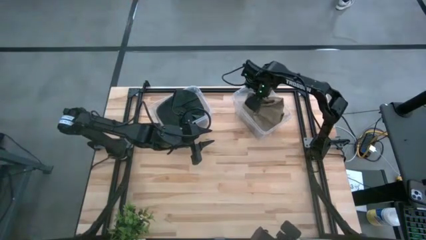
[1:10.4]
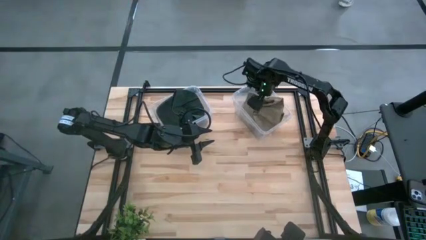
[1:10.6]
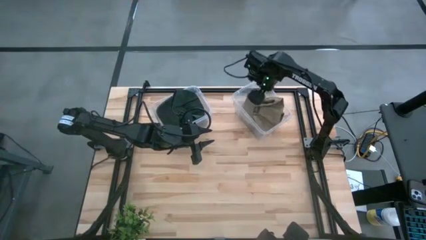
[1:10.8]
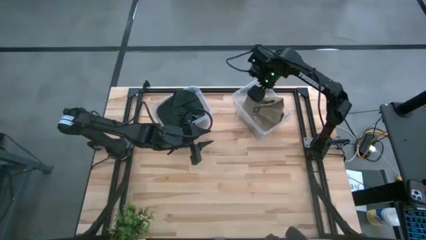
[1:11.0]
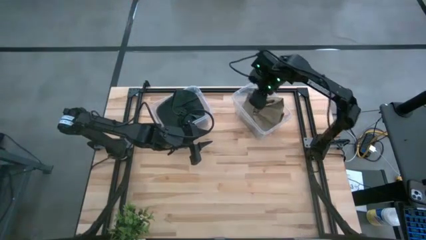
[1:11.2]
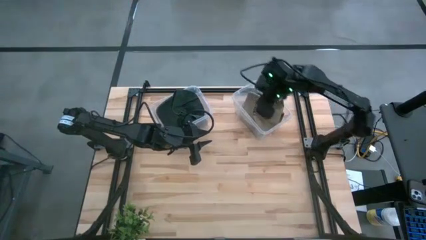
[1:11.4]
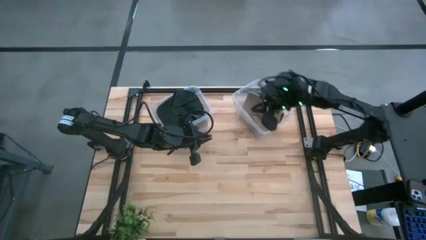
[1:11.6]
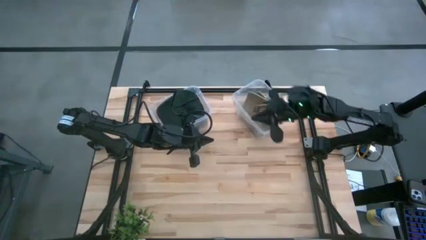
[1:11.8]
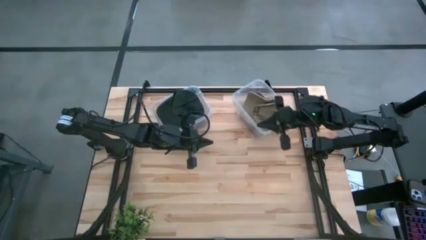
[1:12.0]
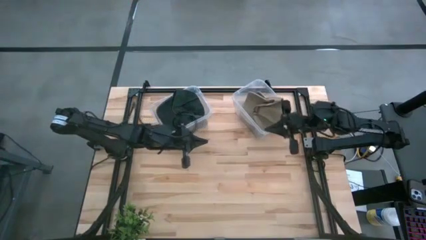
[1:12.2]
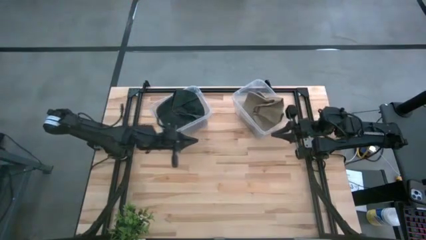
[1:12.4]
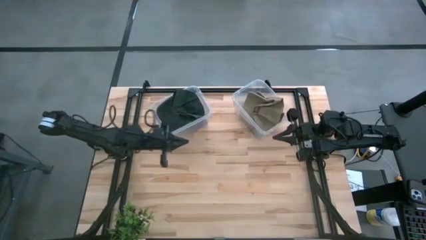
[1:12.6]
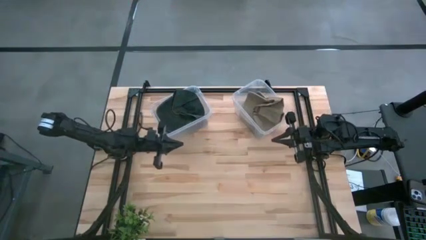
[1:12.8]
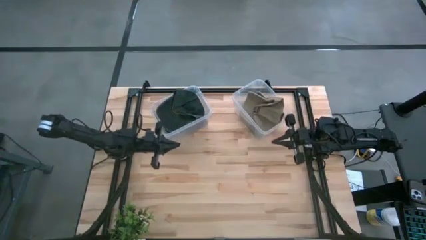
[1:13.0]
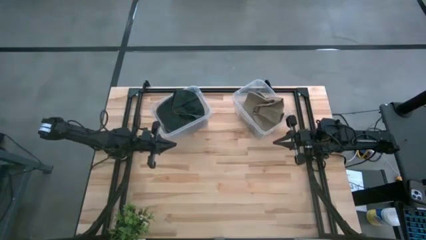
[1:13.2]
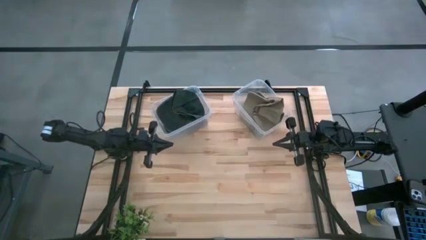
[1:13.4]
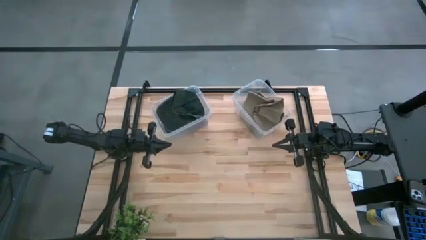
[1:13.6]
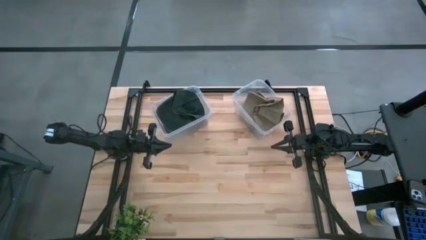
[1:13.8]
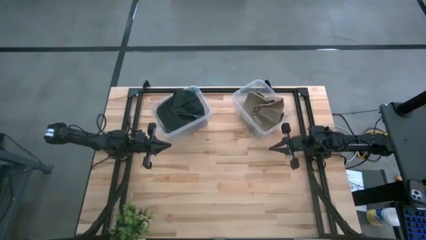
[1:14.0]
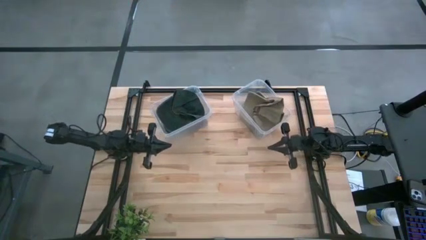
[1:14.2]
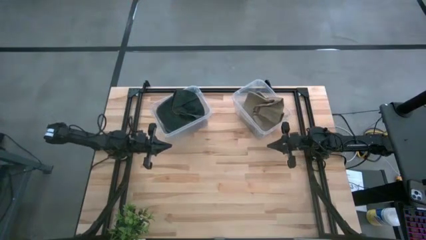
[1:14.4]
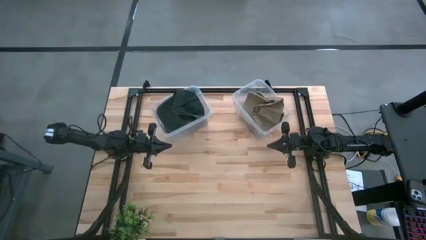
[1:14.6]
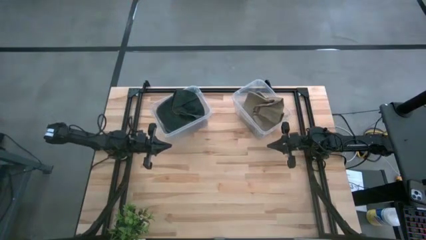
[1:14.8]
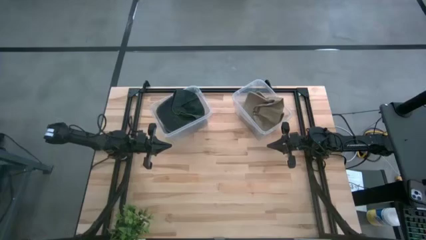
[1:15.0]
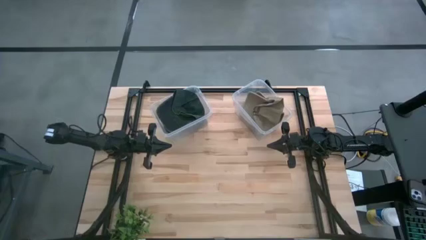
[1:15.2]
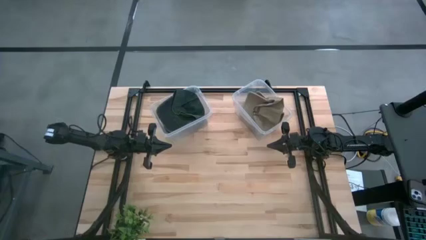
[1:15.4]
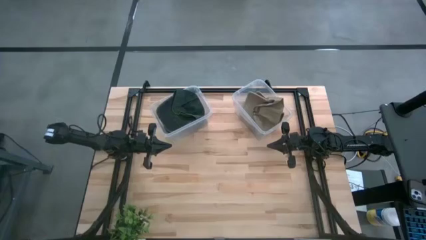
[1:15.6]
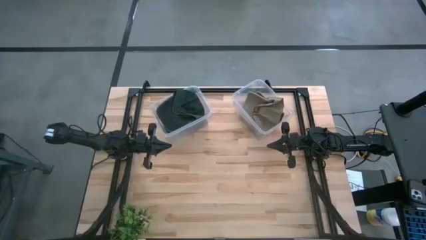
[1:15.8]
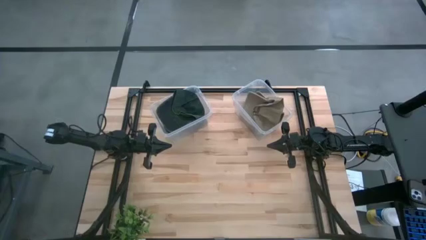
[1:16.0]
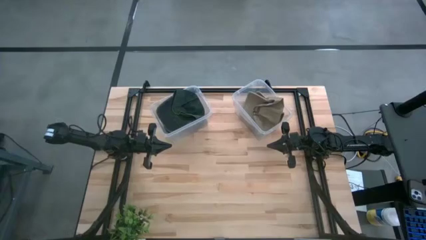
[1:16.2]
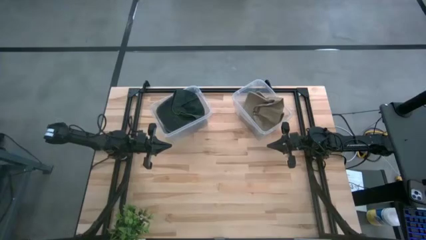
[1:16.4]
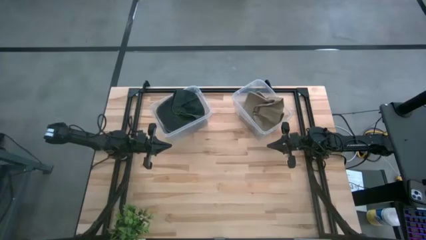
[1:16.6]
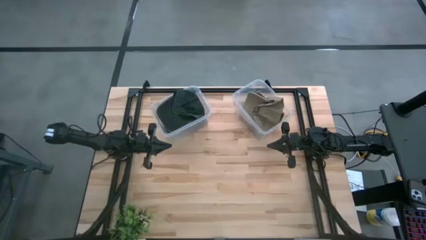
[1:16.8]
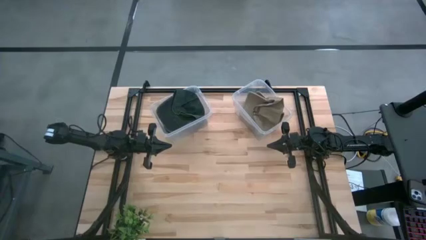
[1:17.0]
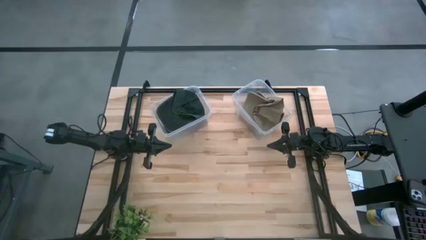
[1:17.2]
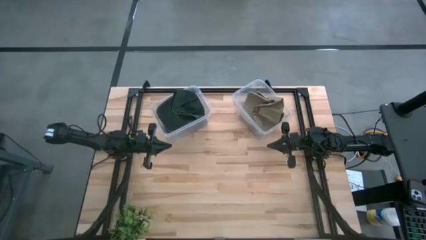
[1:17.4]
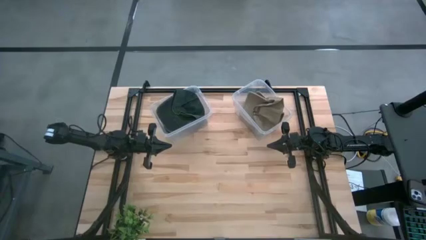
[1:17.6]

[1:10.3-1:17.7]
Task: Pick & Place hat
Return to Home Position
